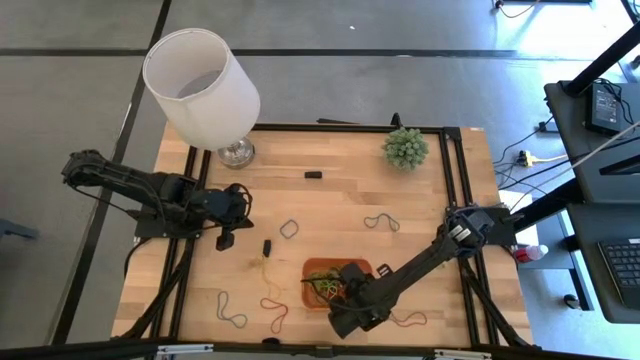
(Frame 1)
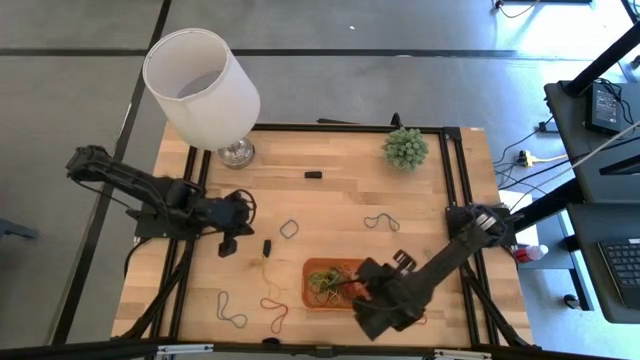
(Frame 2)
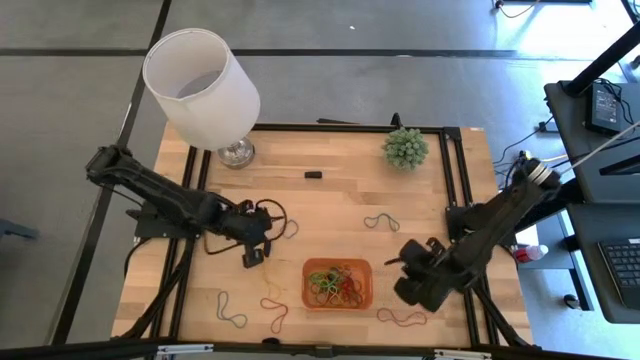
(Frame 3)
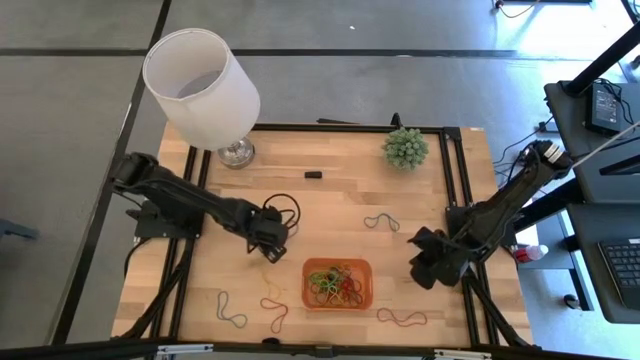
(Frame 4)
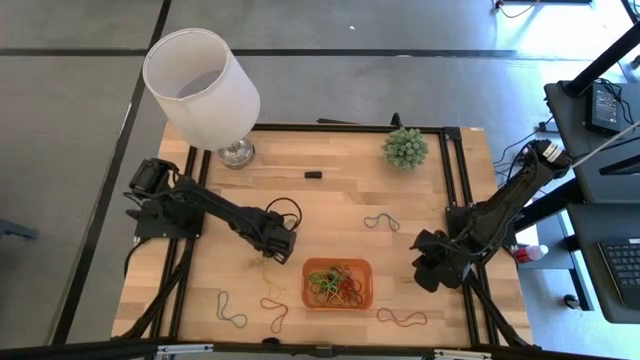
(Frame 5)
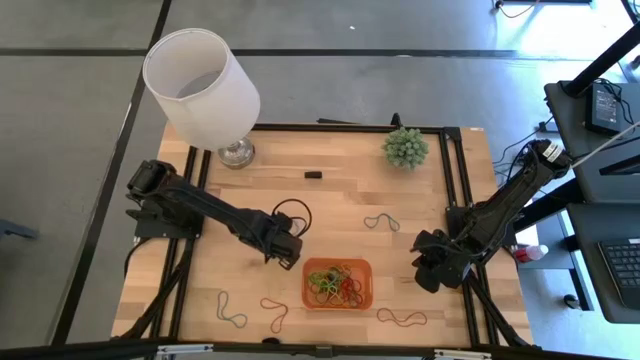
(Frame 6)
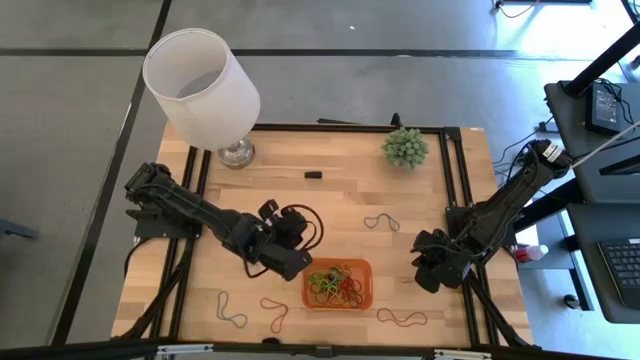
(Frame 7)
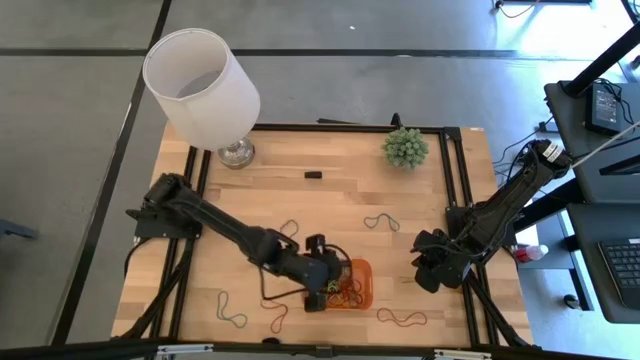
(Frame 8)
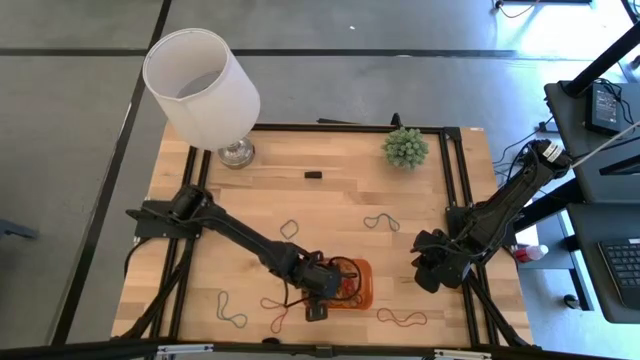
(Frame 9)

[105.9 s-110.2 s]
Task: Pick and place rubber bands into bin
Put the black rubber band into the orange bin

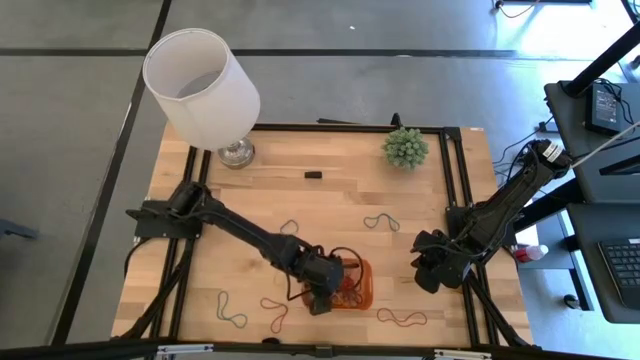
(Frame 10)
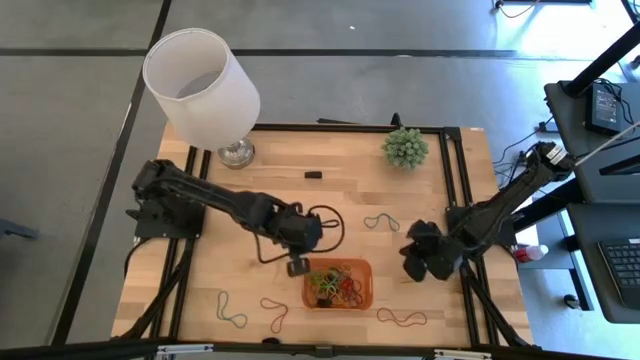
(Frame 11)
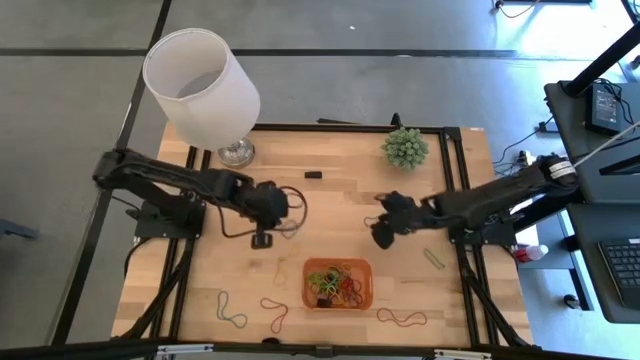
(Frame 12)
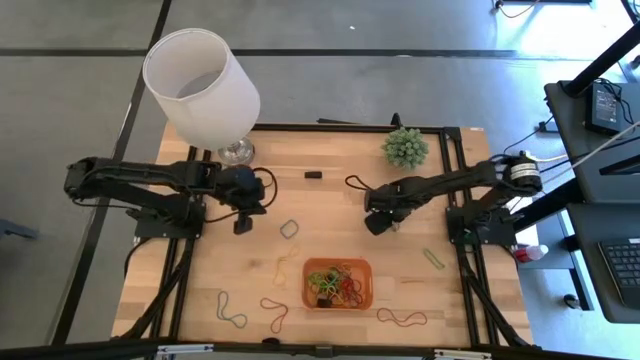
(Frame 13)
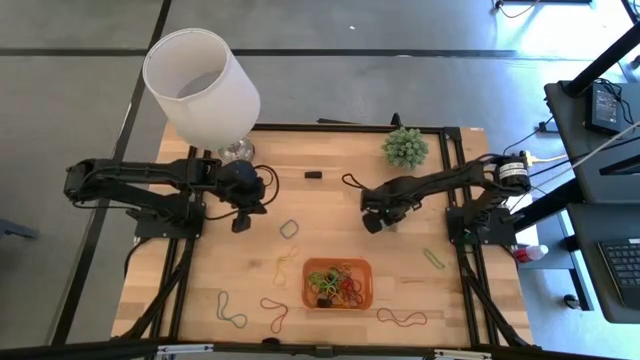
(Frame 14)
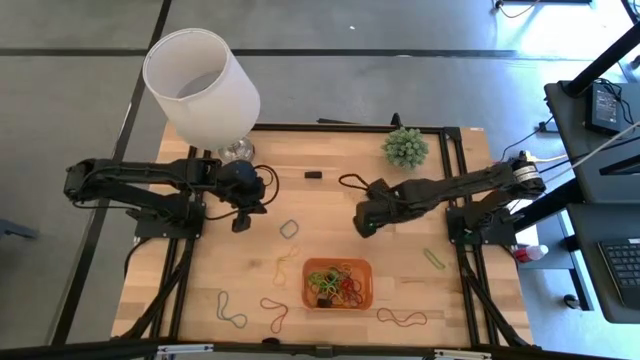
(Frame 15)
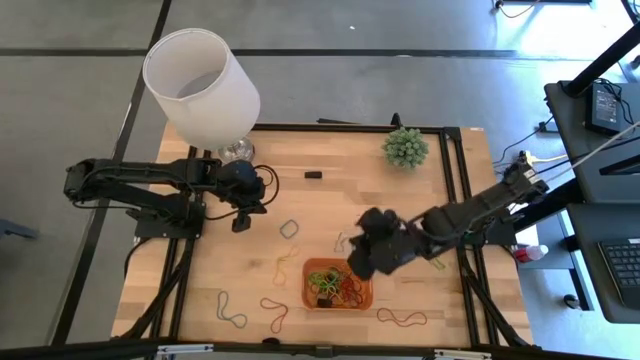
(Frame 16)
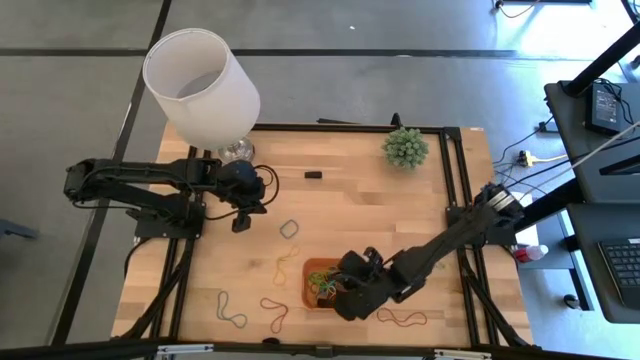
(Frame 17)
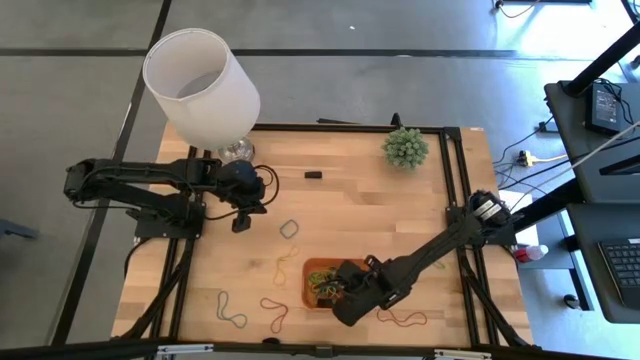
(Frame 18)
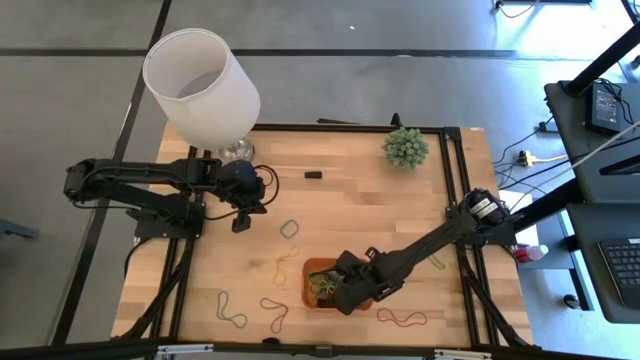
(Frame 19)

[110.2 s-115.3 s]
Put the blue rubber band into the orange bin

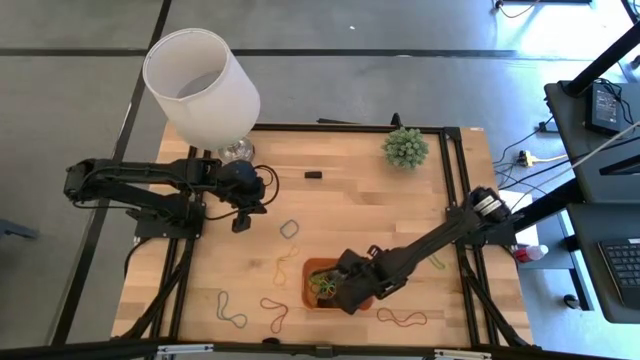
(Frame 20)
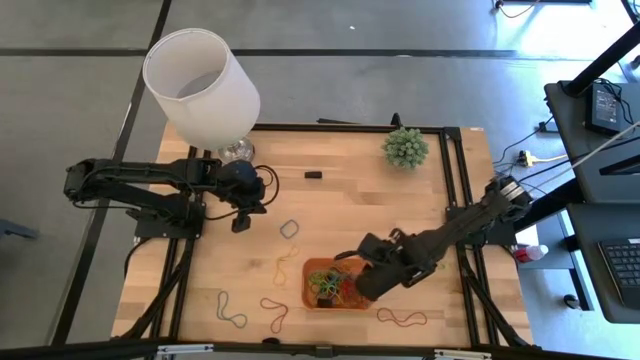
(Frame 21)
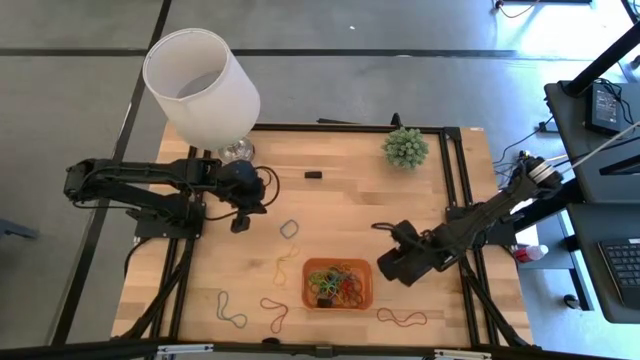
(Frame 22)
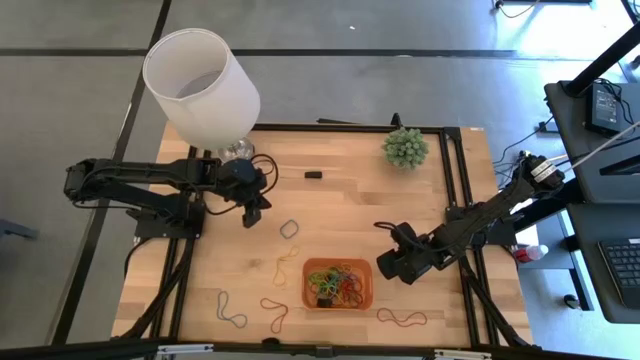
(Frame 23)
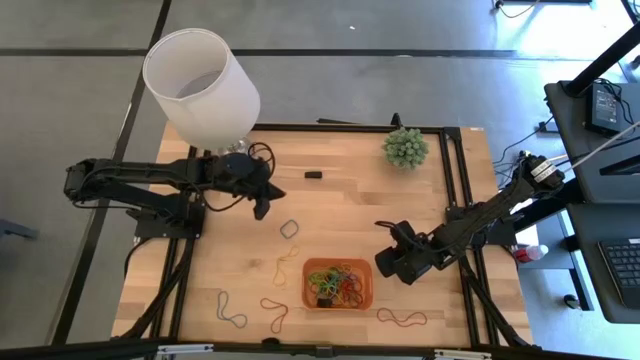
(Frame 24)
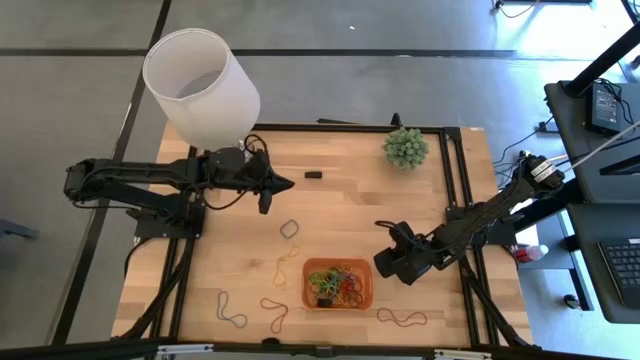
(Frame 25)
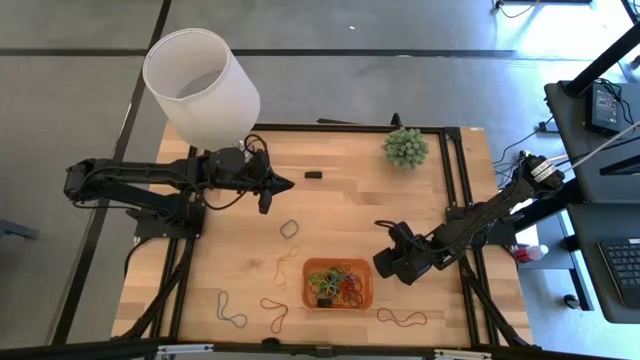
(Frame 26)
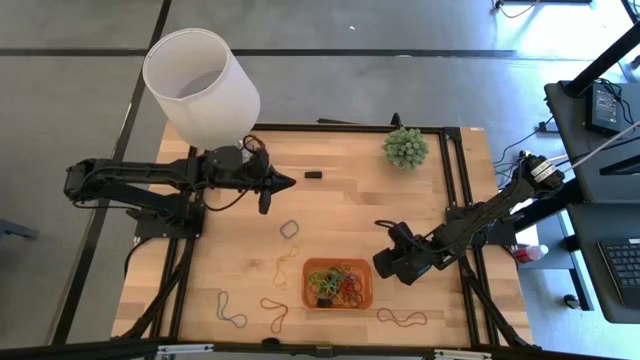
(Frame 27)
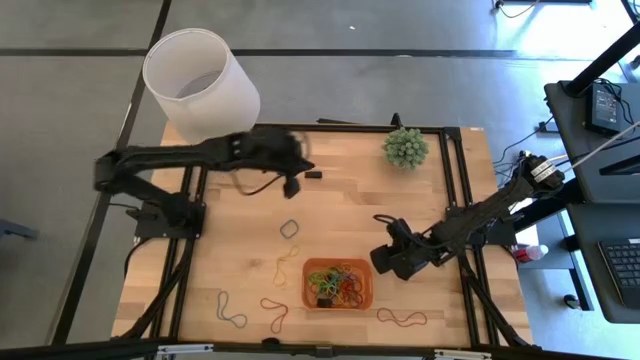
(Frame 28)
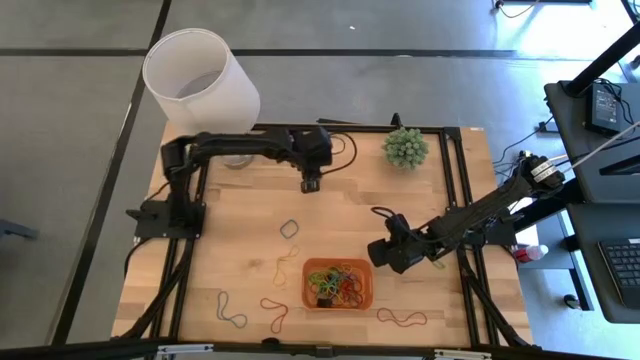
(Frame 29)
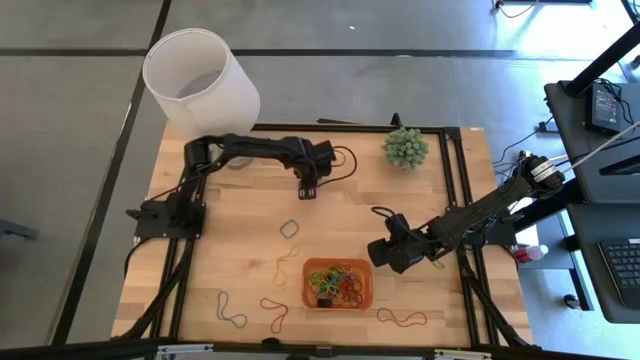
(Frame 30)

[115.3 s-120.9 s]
Put the black rubber band into the orange bin

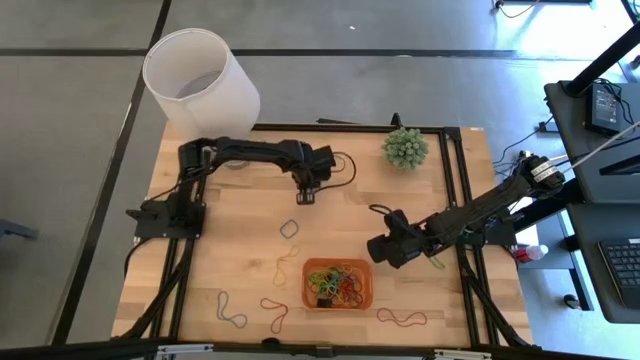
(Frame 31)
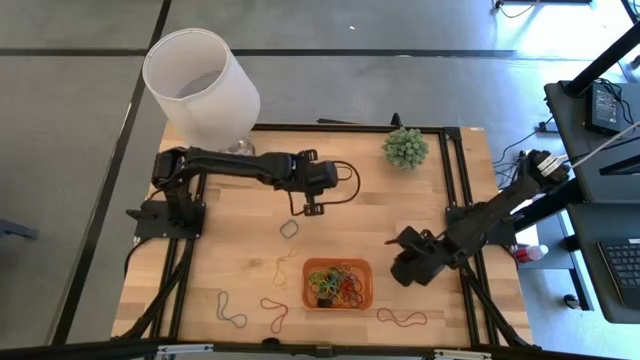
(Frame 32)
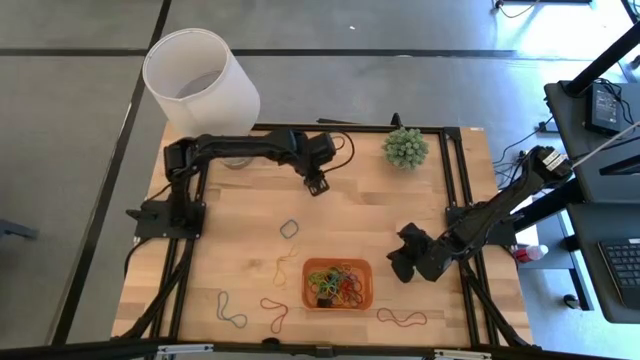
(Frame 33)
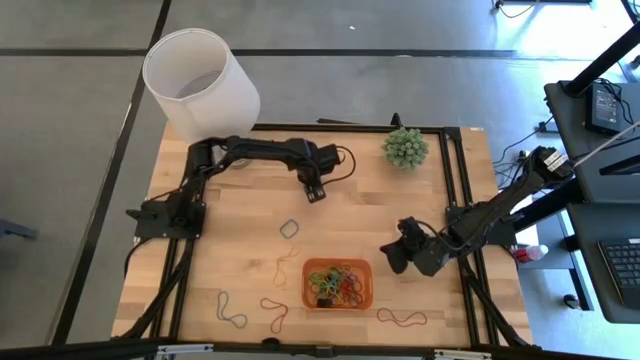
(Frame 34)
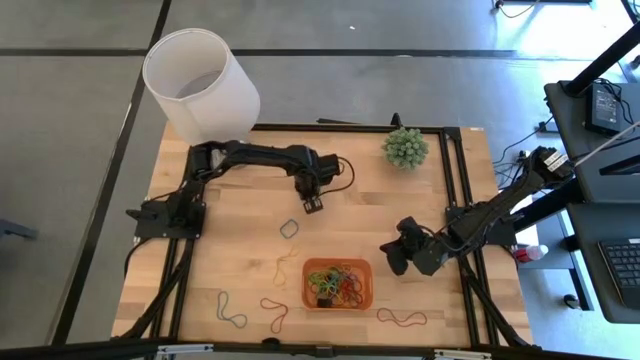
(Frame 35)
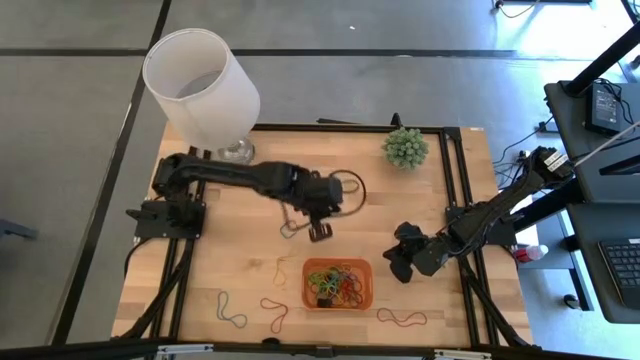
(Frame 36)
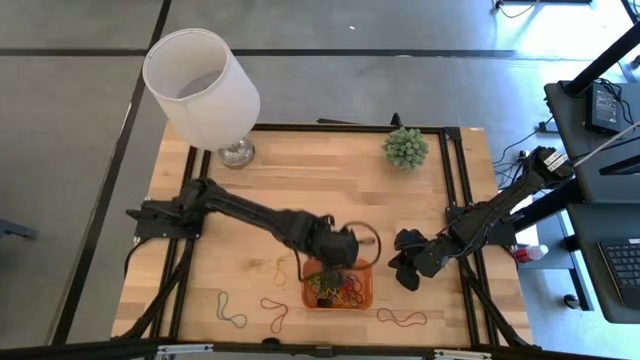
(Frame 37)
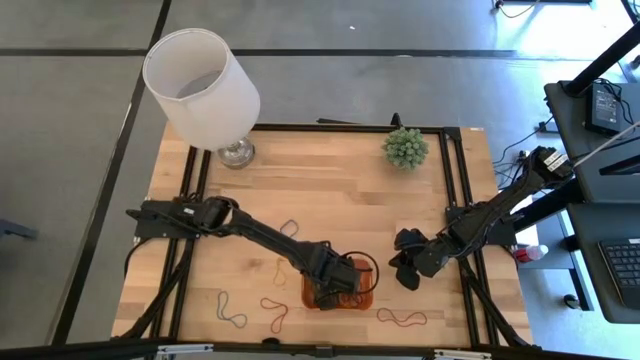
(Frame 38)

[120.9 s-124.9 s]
Put the black rubber band into the orange bin

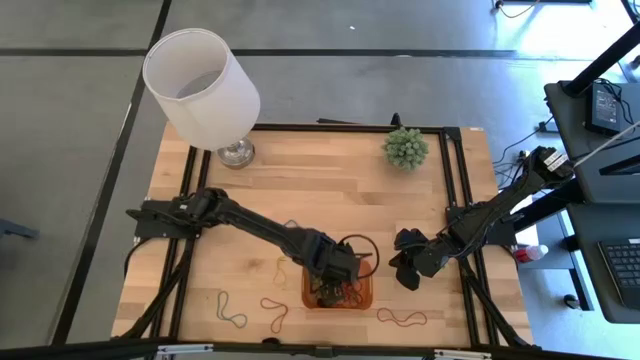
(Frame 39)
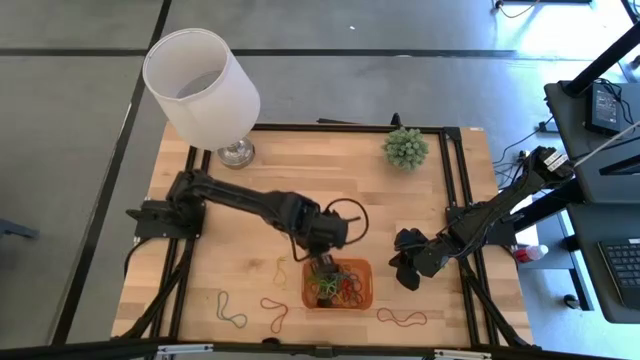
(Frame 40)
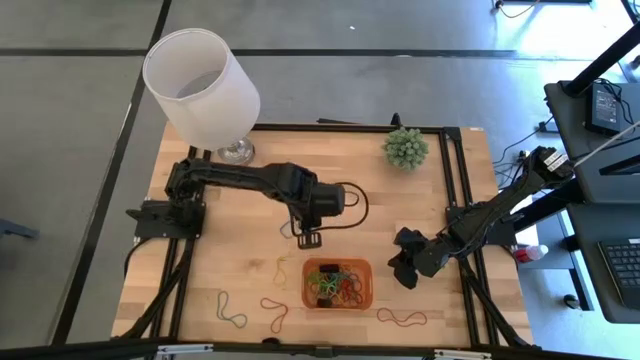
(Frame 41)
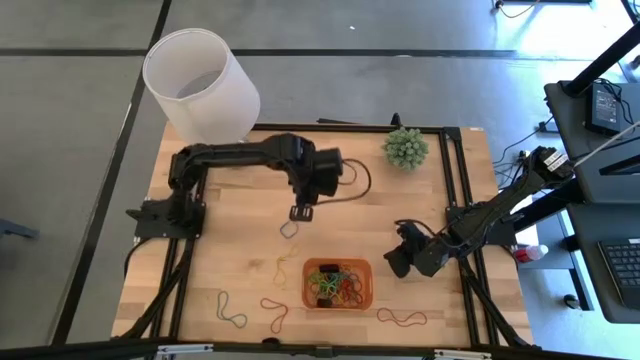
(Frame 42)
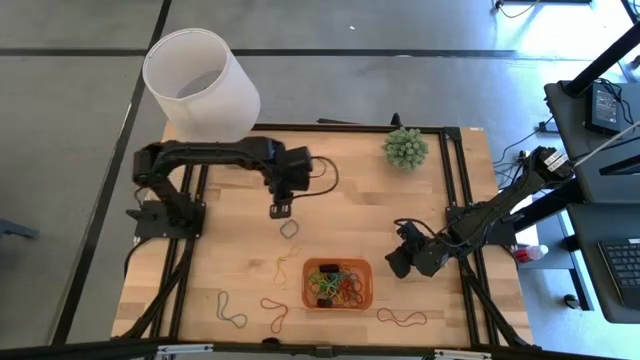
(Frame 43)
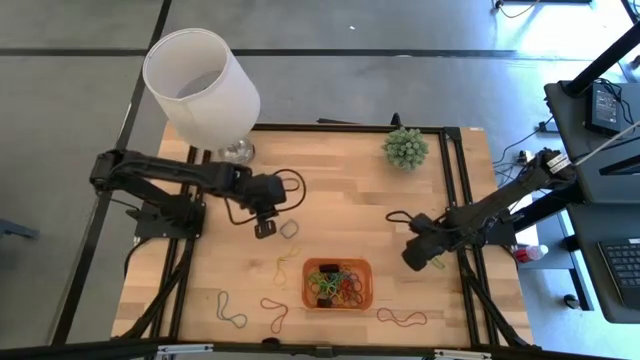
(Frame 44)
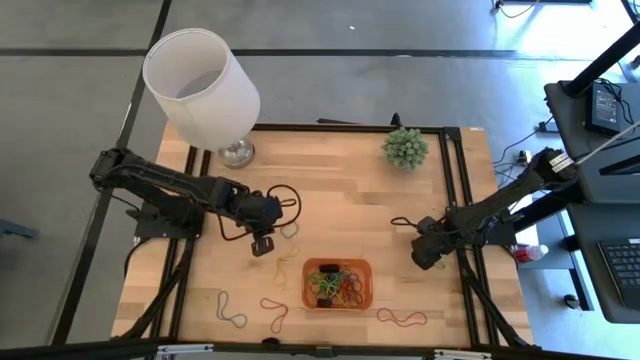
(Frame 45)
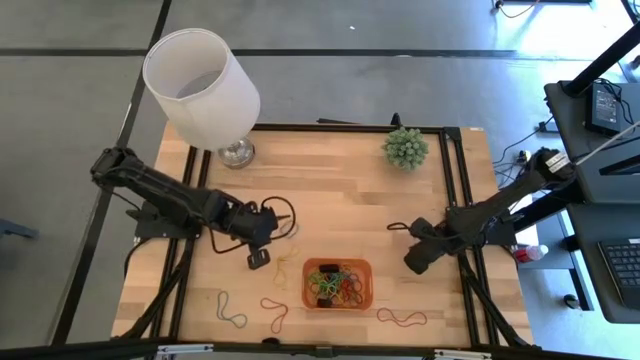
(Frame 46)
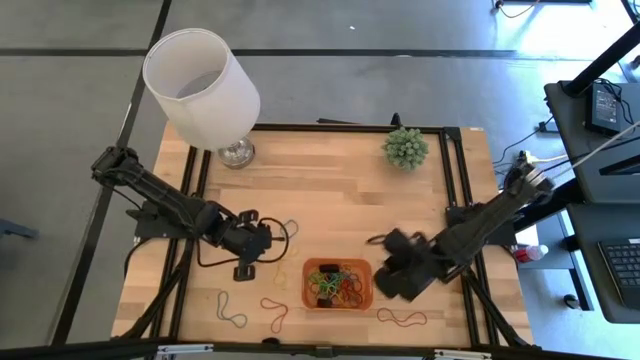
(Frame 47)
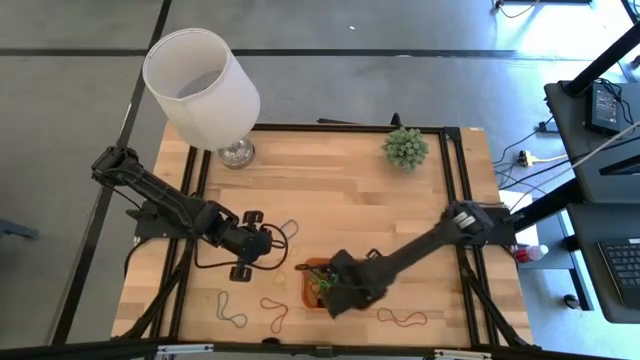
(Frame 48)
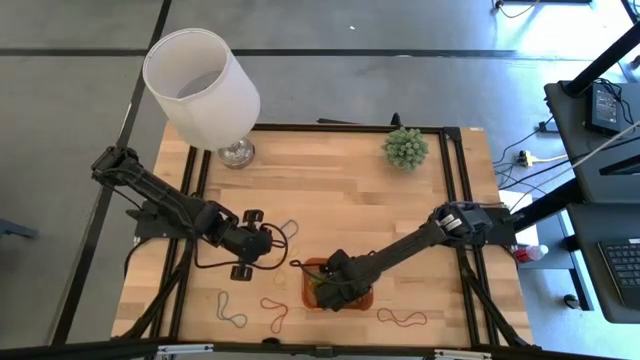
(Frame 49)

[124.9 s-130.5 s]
Put the green rubber band into the orange bin
